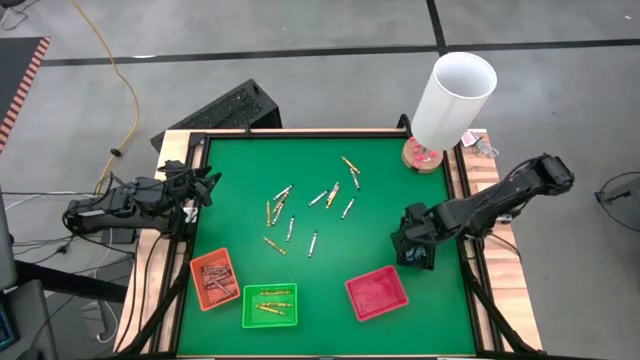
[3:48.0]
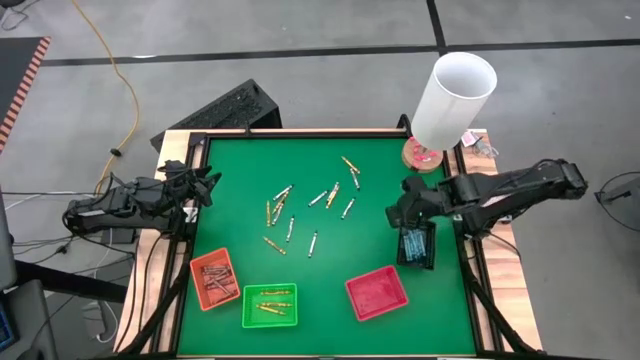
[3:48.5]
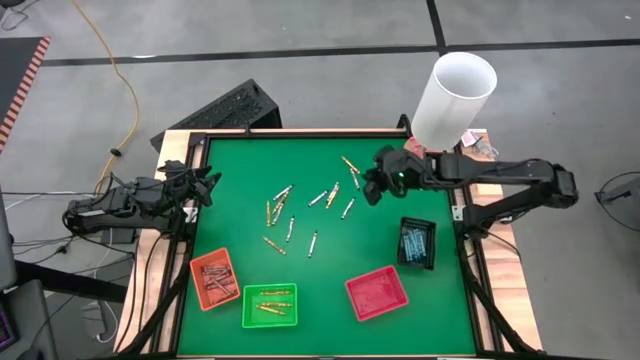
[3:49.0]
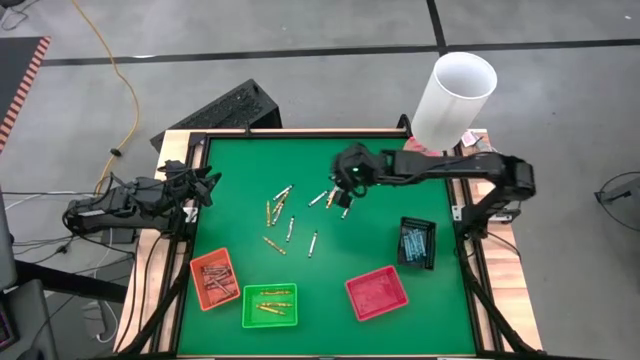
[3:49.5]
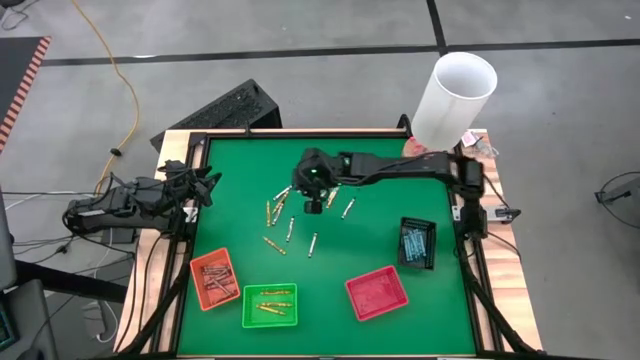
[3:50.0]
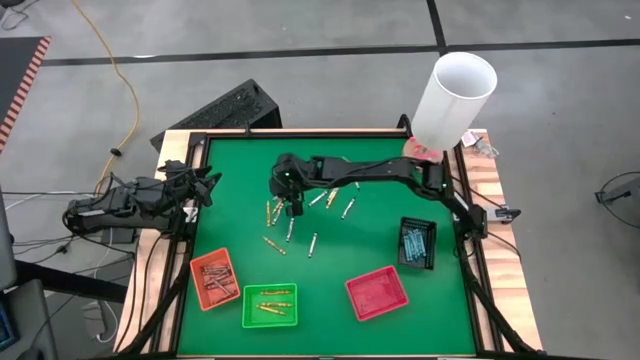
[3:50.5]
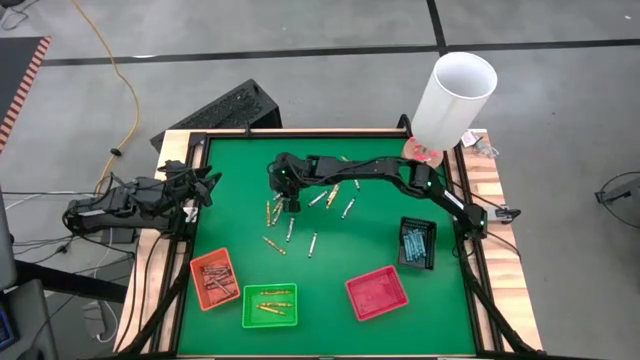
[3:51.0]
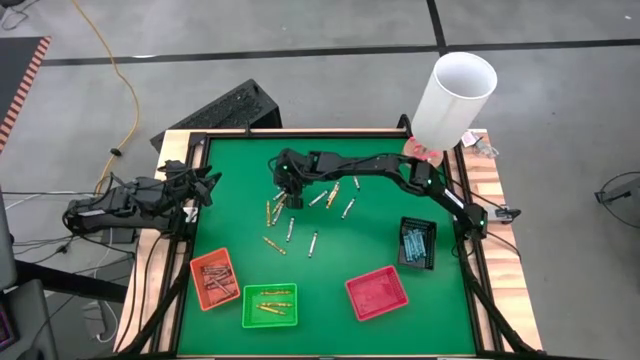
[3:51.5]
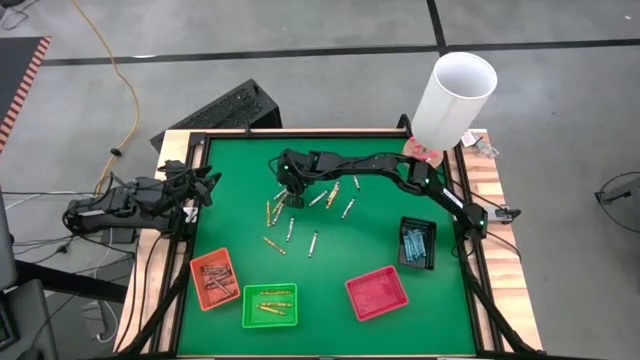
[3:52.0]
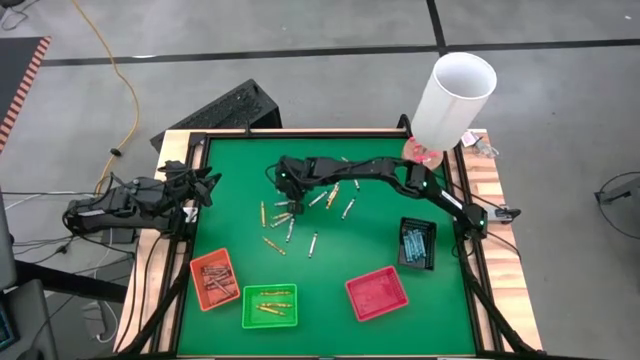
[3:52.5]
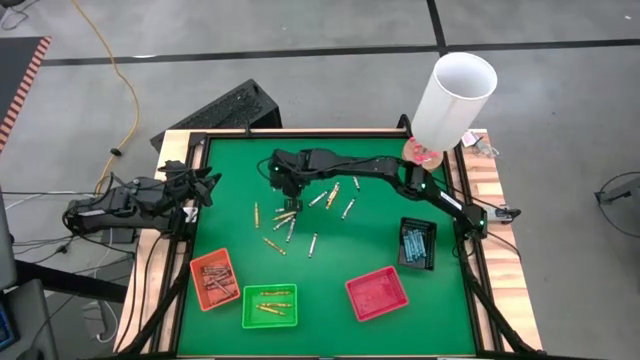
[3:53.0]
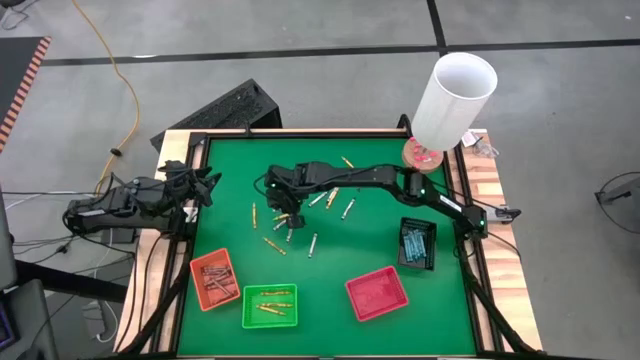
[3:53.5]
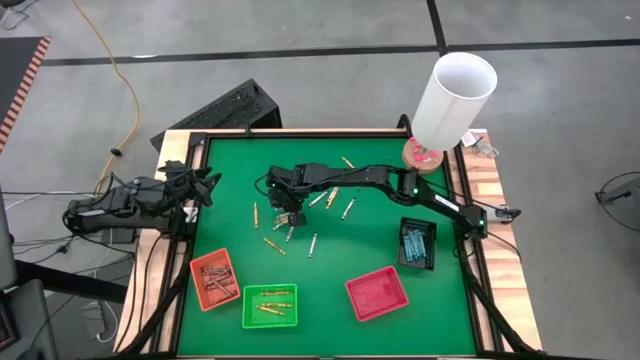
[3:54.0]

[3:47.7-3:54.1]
Task: Sort crayons
Put the black crayon into the red bin

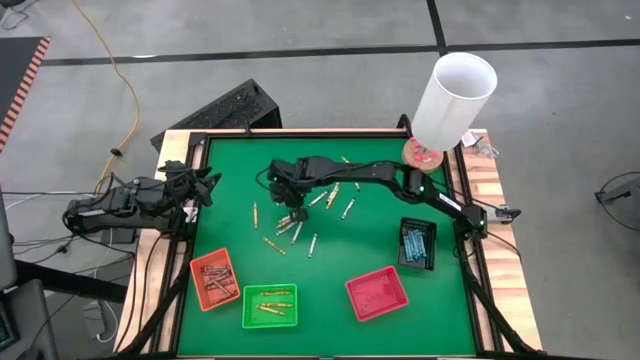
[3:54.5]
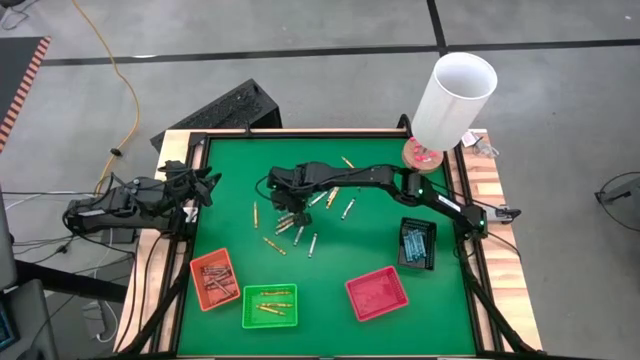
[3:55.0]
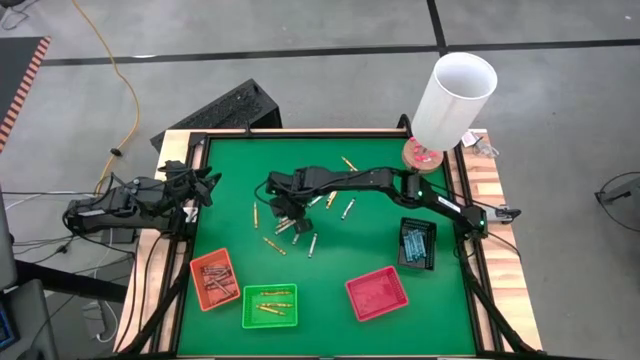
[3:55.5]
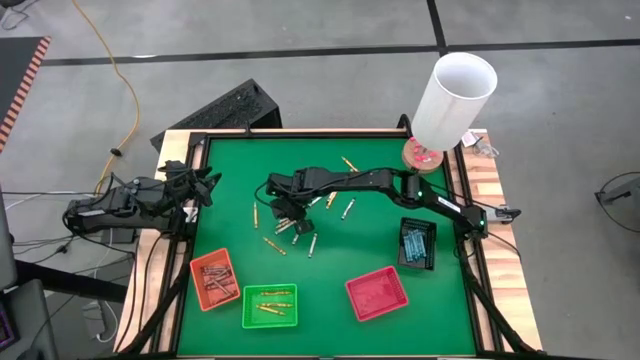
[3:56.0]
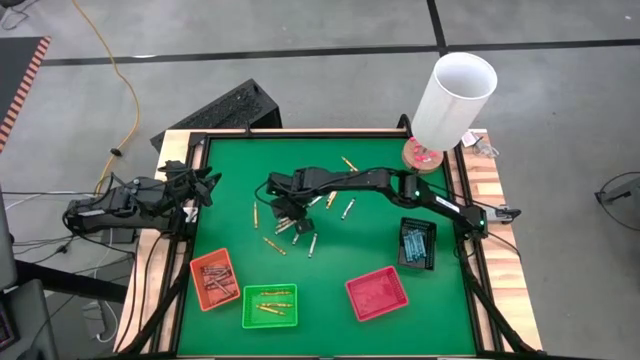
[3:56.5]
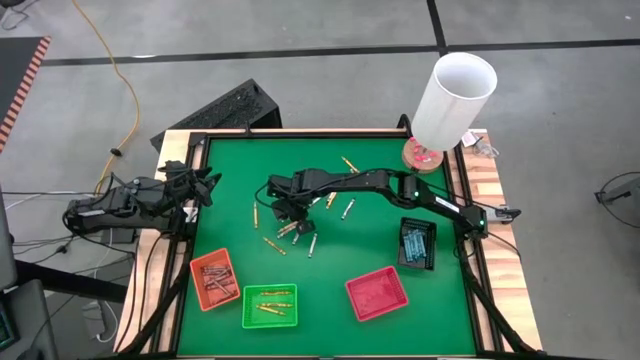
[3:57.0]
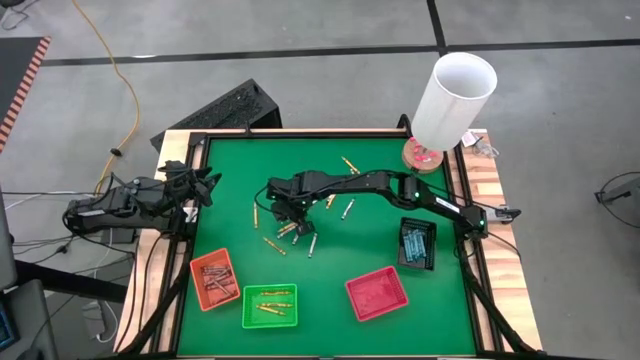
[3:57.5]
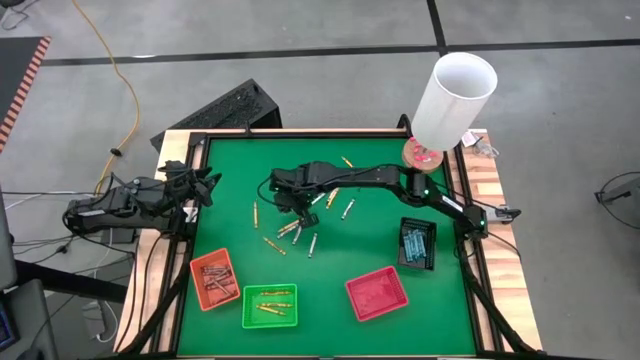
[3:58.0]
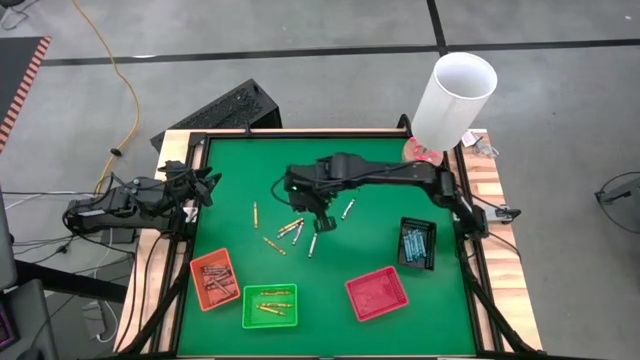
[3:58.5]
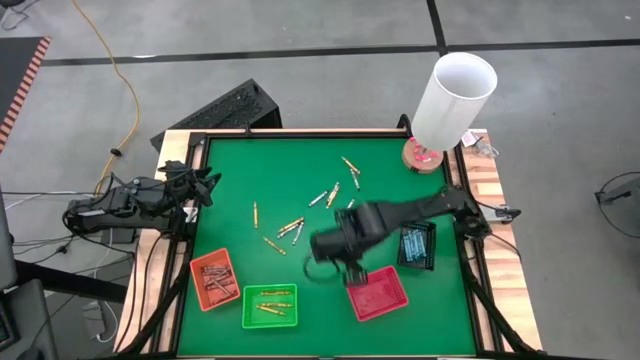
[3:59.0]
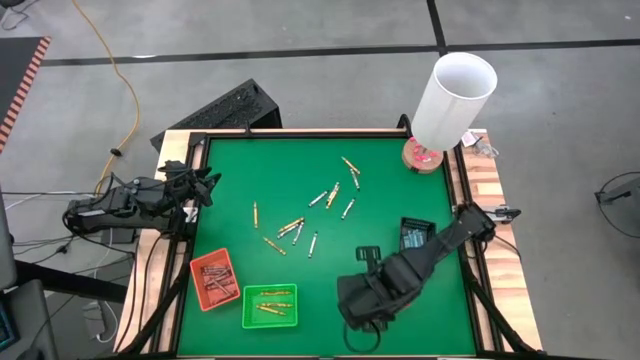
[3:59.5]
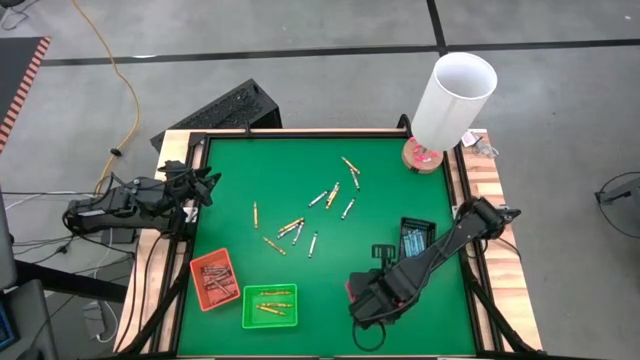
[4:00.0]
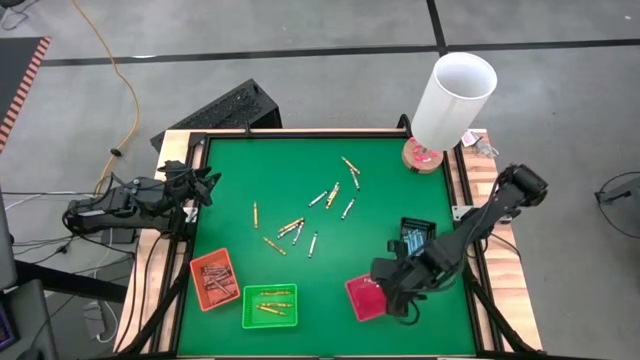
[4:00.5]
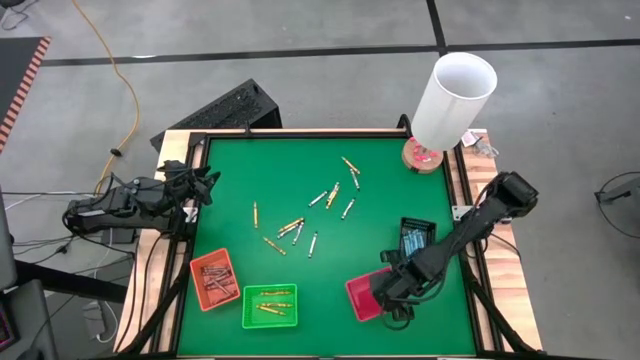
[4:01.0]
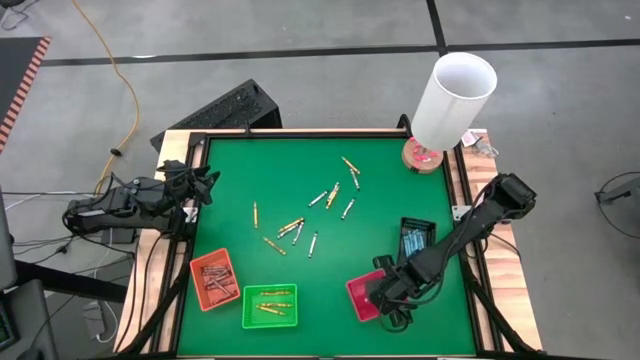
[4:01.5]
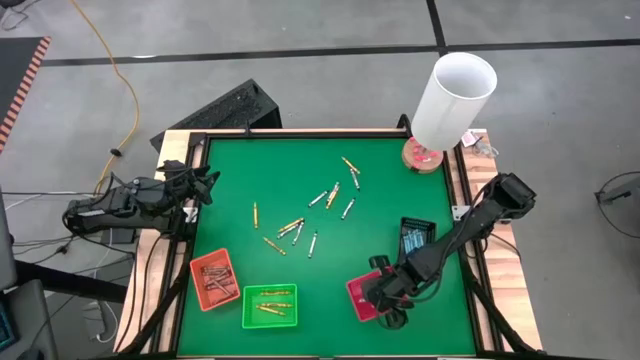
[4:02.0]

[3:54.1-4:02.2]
Put the black crayon into the red bin

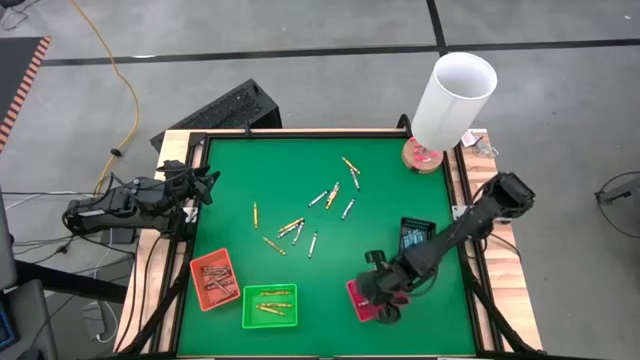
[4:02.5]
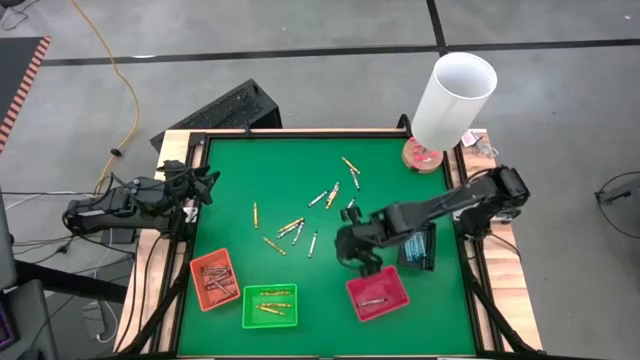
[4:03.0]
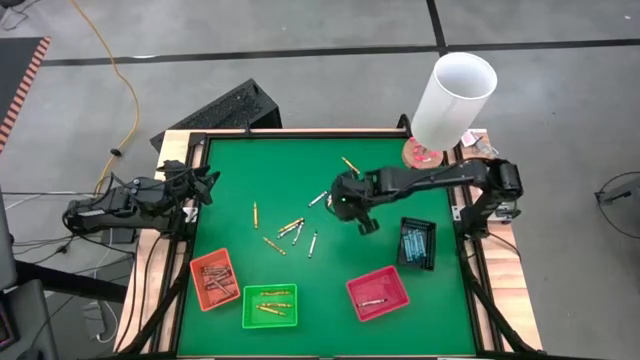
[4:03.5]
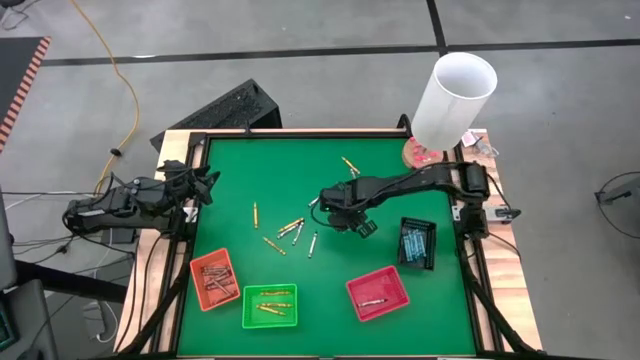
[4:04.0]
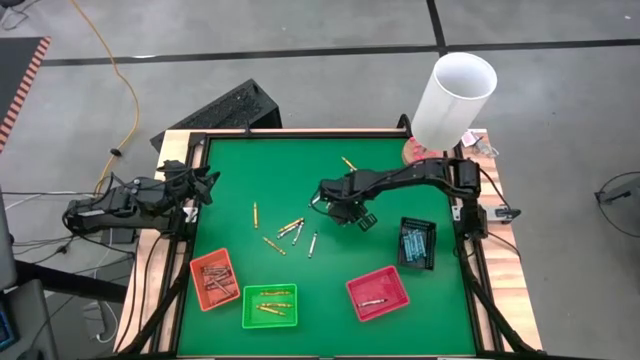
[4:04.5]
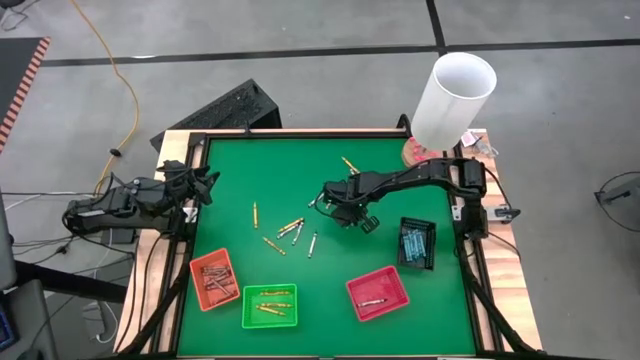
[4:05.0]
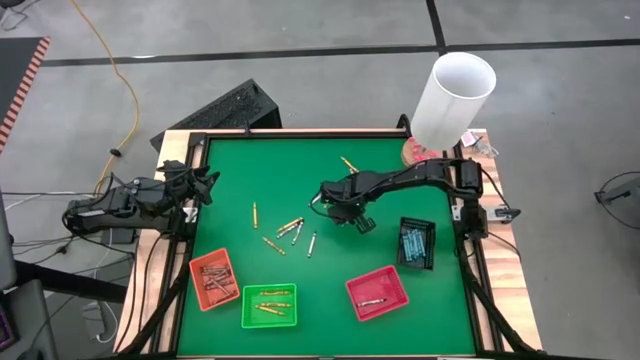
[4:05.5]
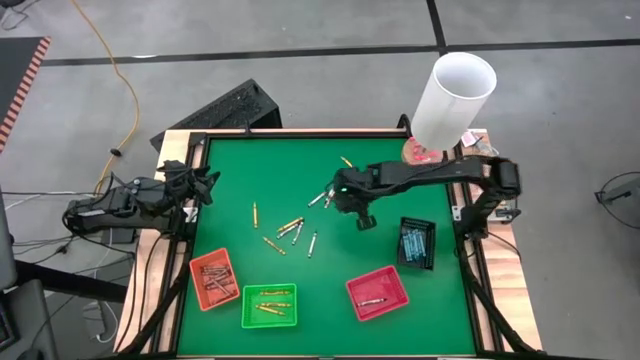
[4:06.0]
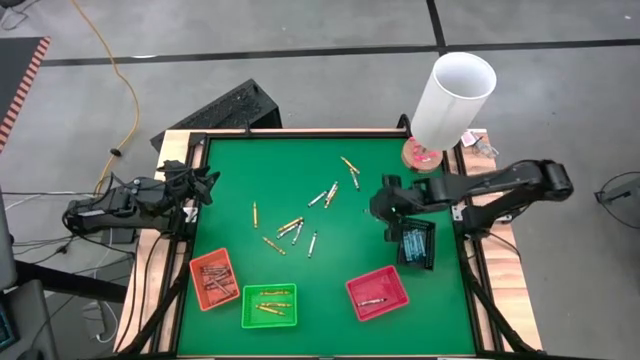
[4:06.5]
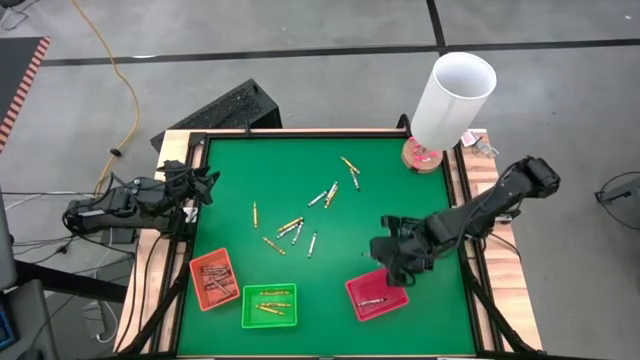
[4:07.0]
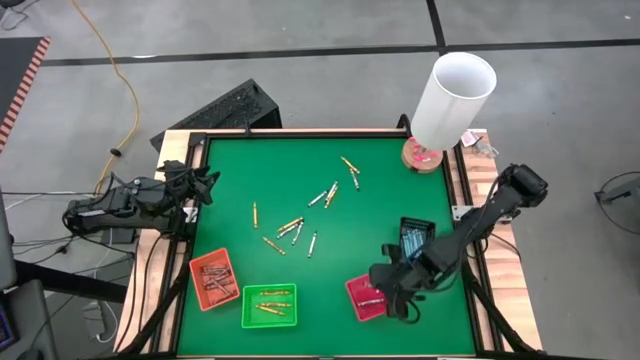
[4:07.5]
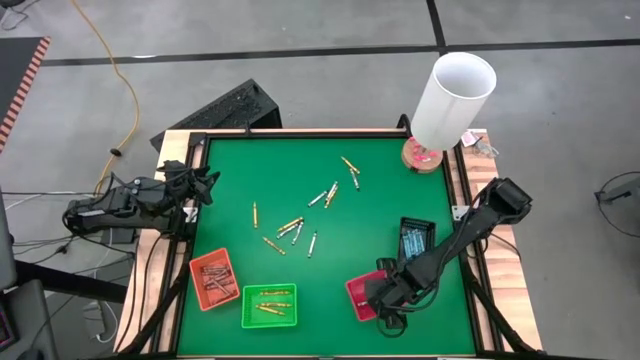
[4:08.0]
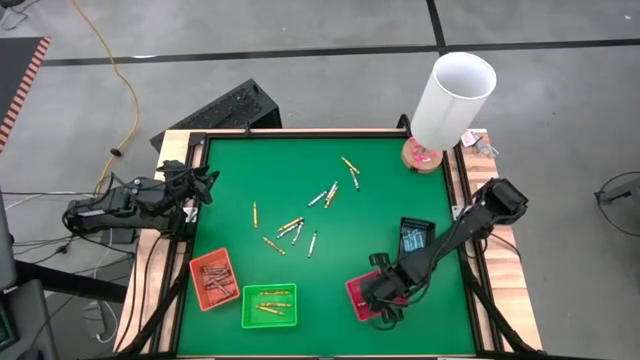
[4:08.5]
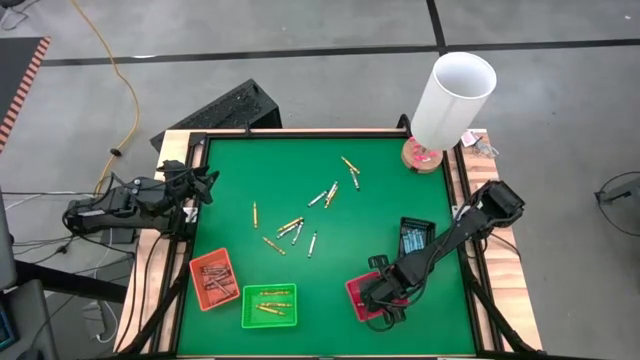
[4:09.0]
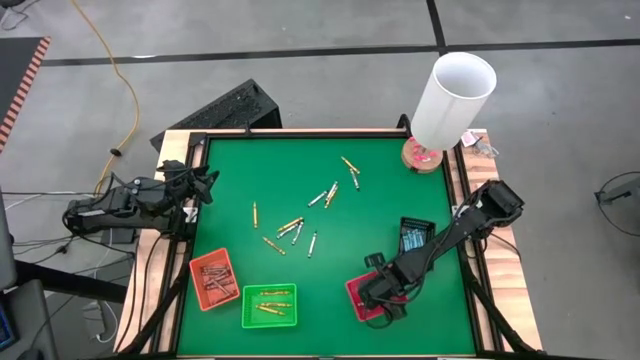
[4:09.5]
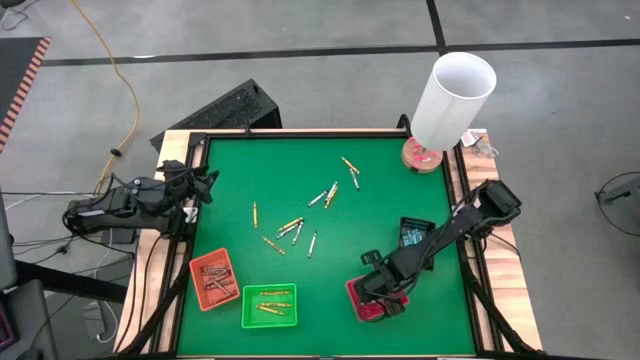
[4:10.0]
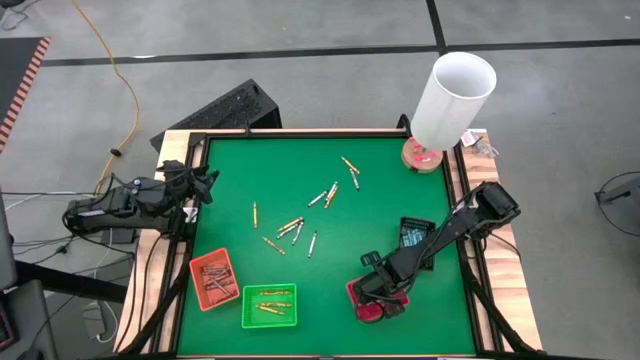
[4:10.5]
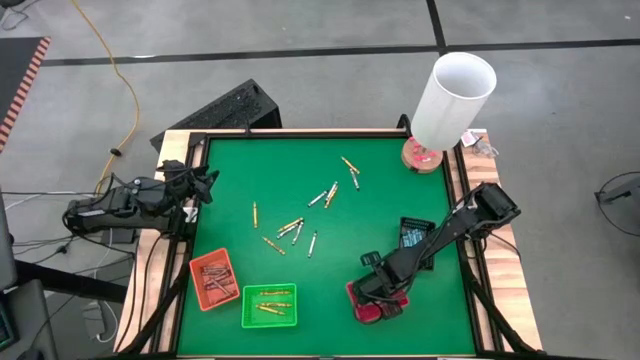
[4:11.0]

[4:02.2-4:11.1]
Put the black crayon into the red bin
